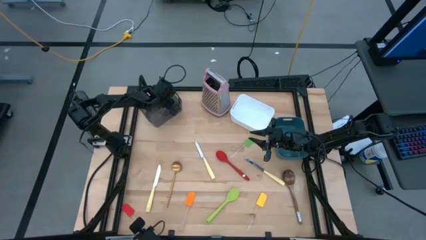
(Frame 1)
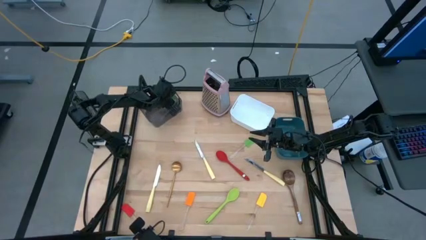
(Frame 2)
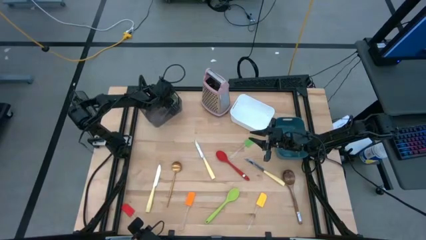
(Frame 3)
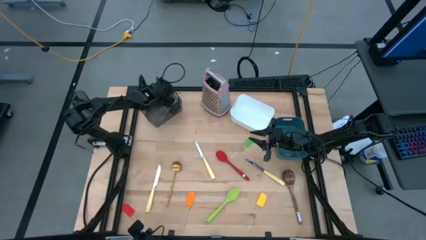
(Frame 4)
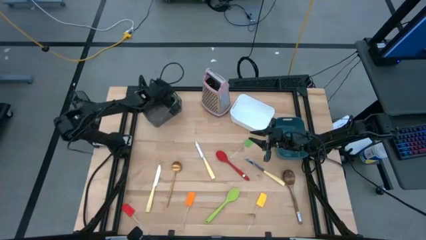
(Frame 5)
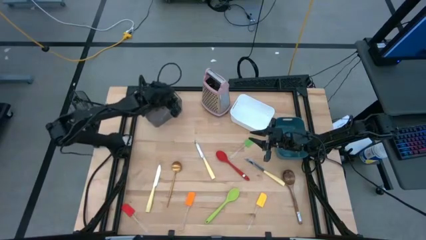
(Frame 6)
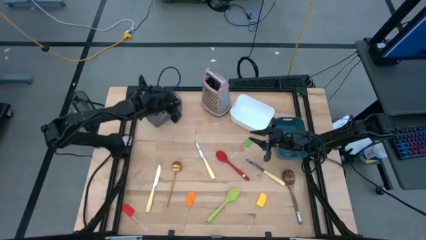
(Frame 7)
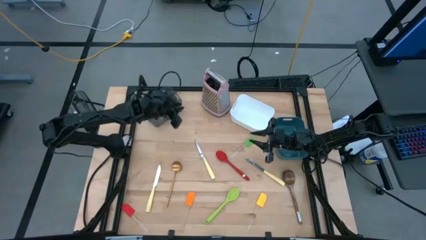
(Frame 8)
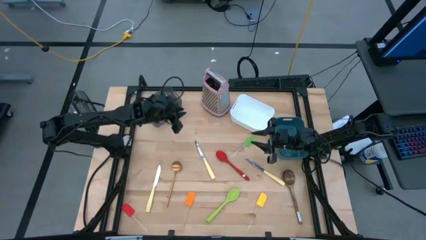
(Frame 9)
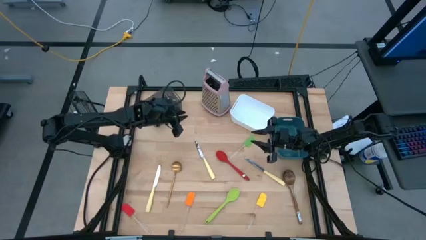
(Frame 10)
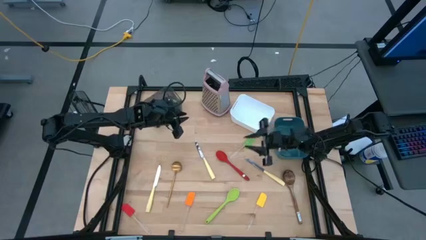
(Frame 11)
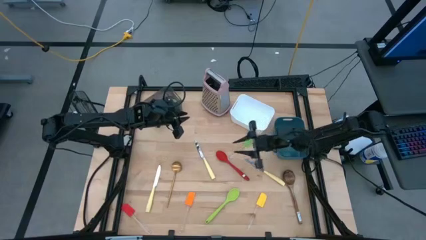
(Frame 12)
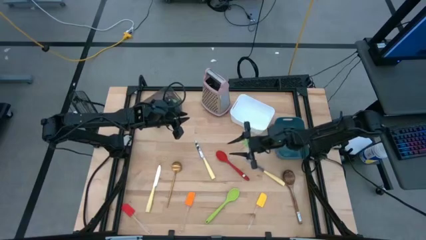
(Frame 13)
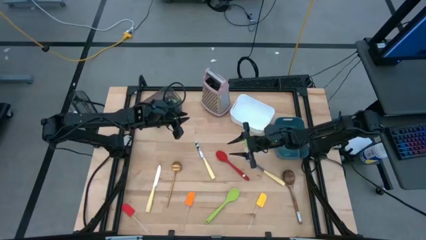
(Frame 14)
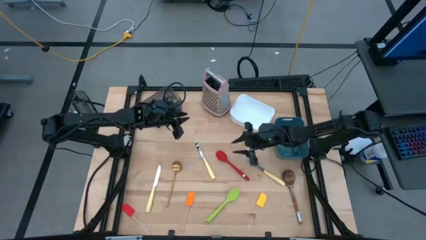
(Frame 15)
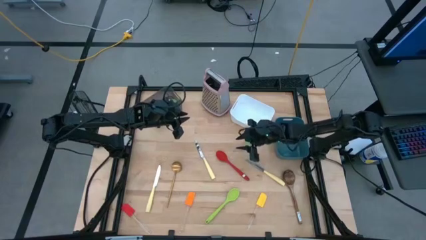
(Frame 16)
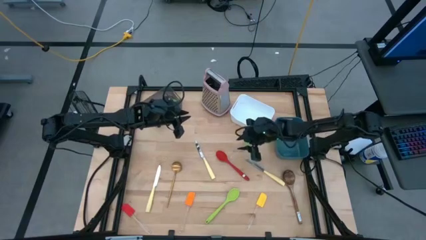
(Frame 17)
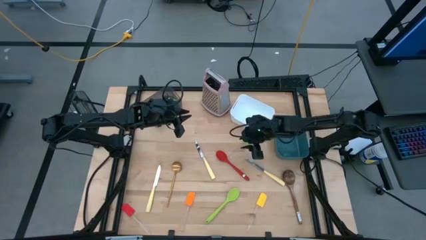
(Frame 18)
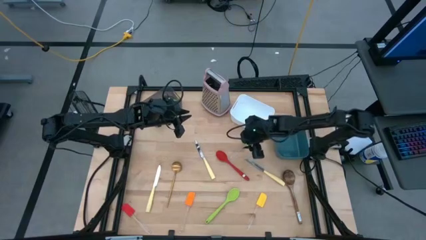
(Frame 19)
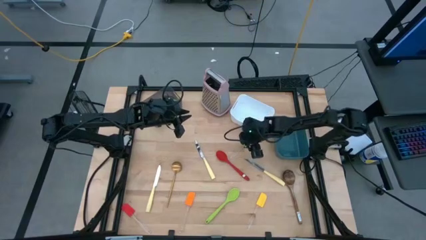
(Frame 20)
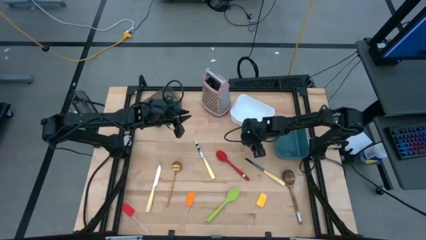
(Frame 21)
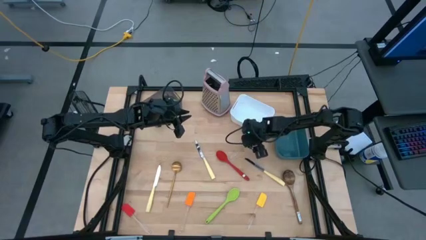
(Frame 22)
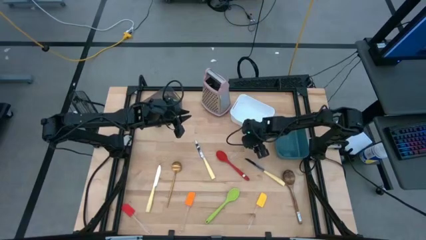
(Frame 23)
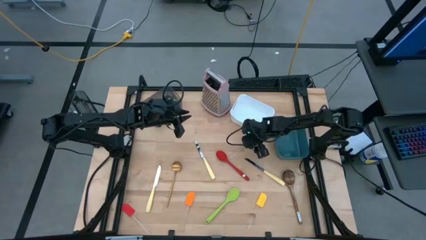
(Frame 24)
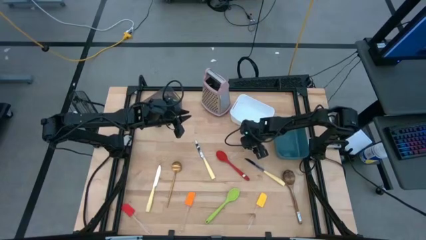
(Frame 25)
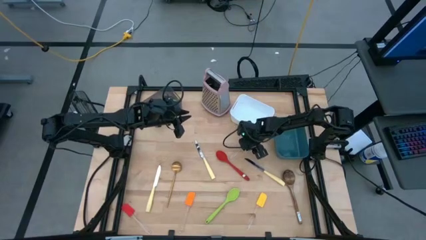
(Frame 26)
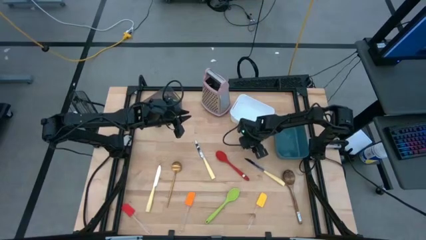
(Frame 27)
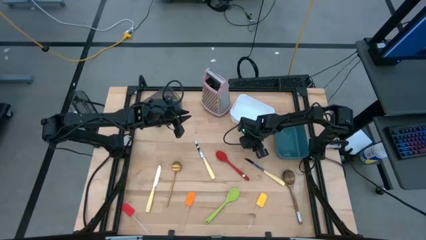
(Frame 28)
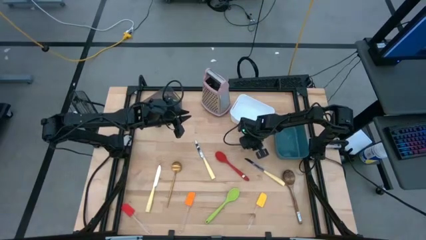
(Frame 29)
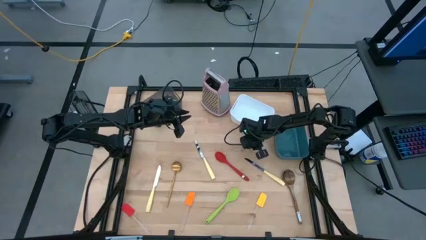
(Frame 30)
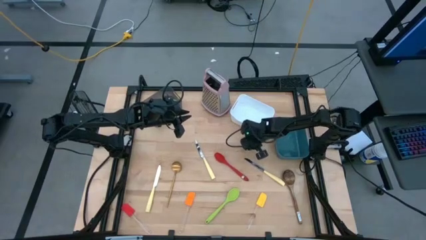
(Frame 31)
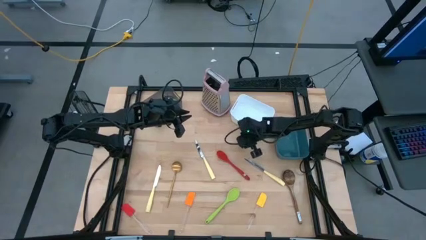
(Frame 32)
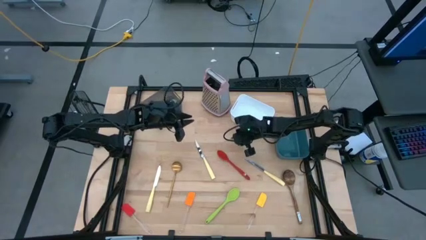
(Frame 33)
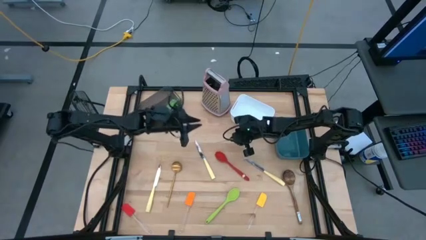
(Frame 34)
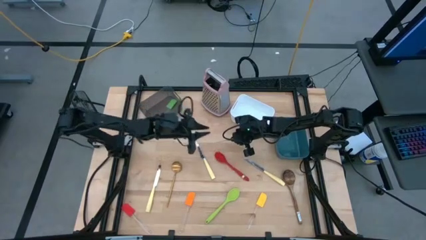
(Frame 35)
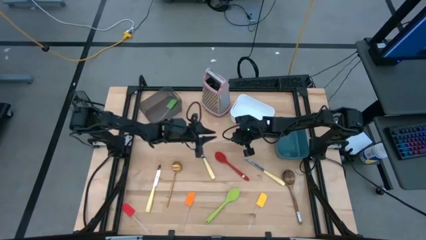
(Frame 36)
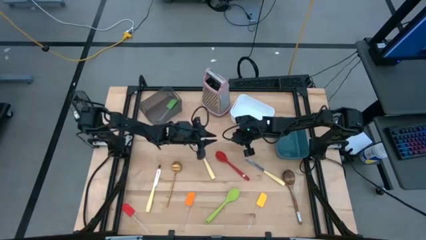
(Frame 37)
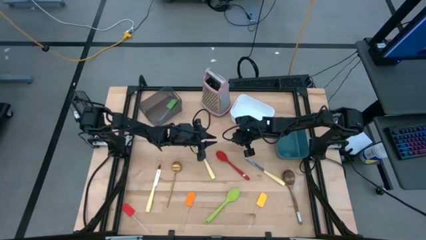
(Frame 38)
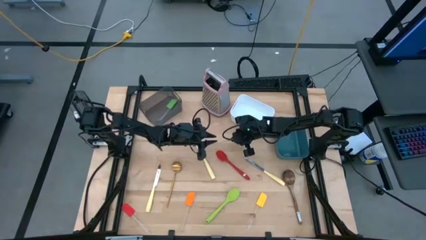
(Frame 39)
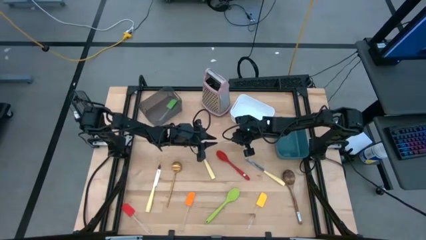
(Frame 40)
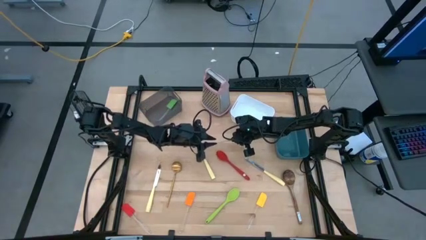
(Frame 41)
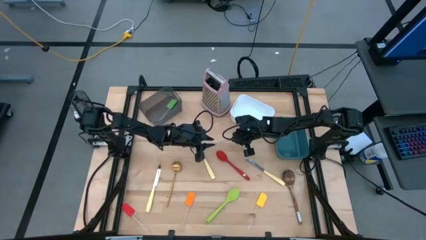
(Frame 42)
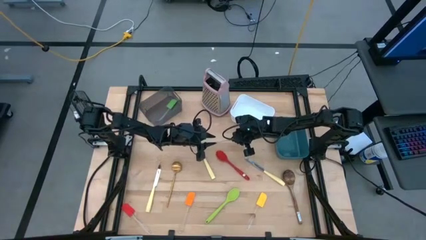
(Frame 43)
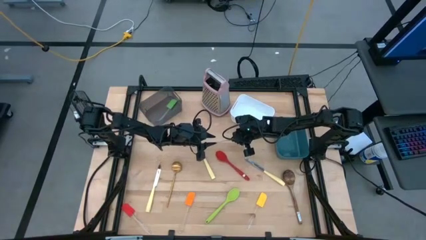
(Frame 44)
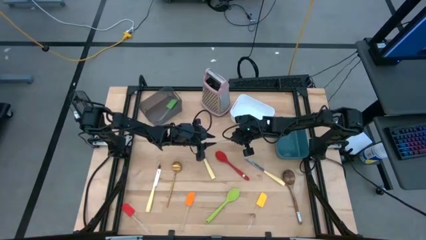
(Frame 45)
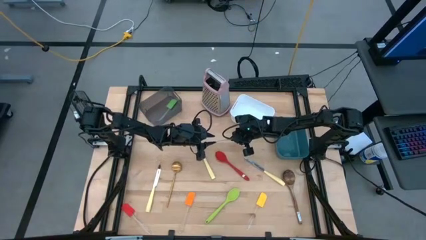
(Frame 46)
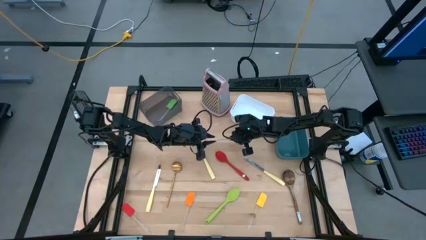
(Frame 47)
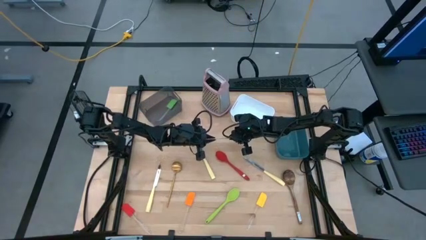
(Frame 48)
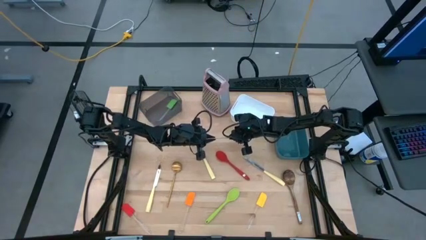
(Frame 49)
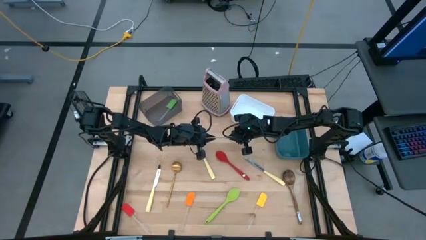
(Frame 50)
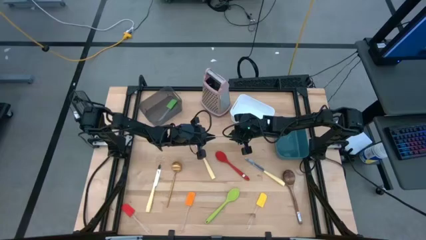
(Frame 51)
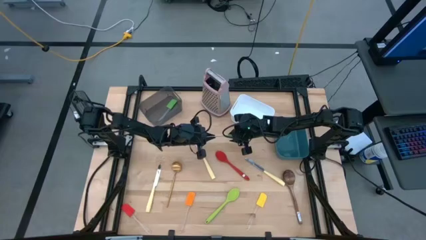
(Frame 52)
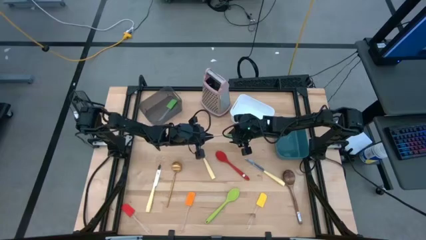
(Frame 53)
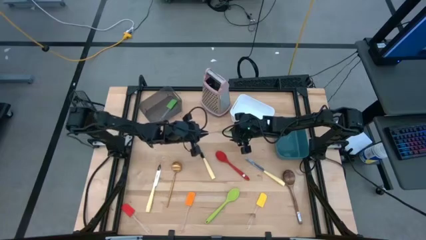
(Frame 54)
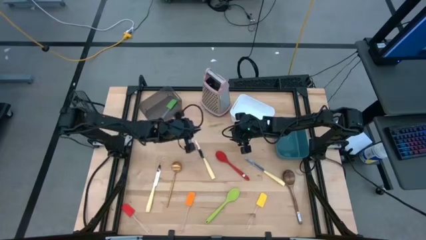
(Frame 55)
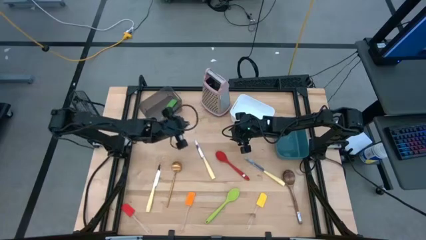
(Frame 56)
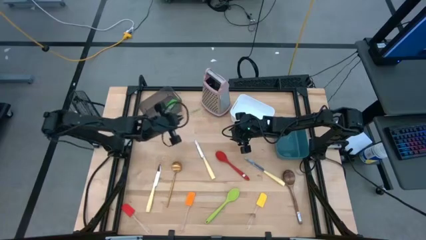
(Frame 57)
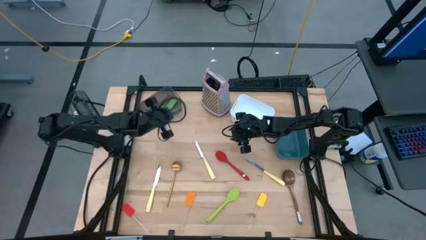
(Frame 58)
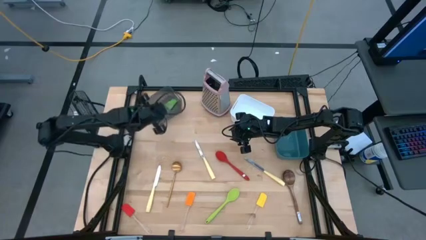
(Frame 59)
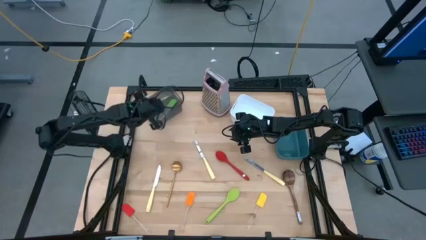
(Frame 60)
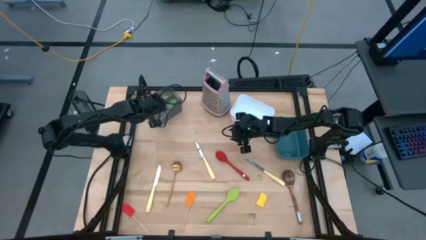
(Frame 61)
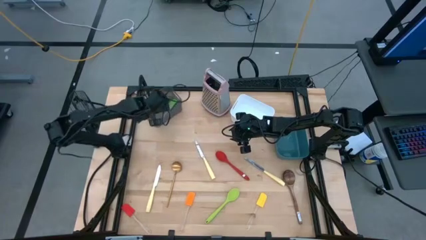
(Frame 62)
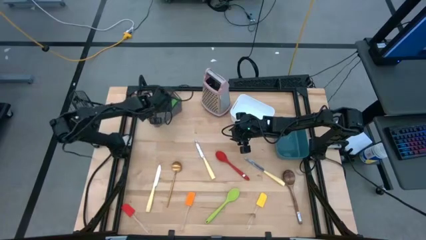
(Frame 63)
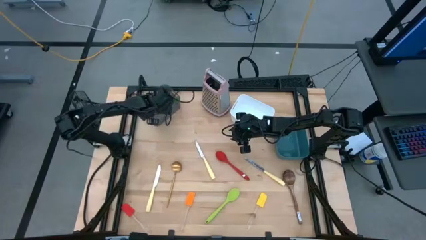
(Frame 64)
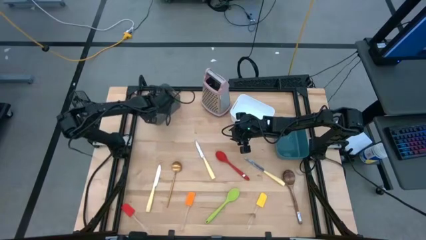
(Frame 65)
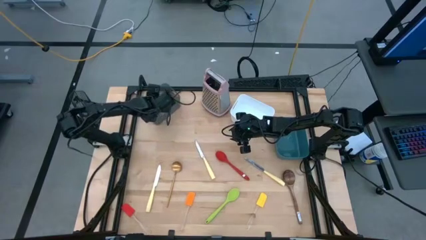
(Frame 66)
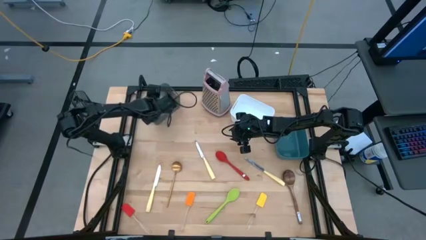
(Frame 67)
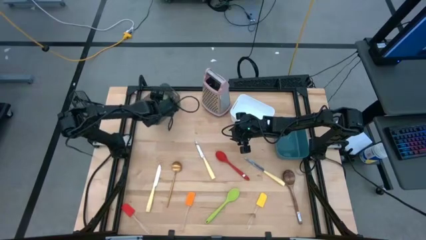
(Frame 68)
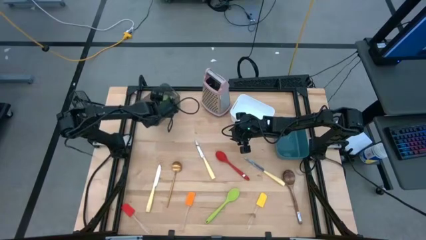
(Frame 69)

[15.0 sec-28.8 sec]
Task: Pick & Place Kitchen Items
Put the green spatula into the black bin
